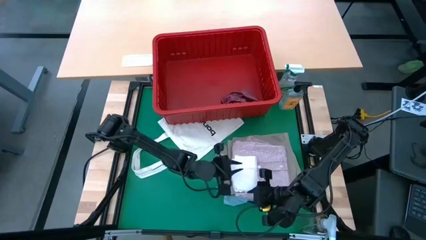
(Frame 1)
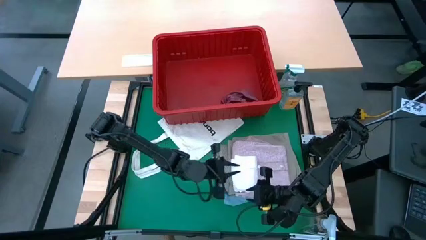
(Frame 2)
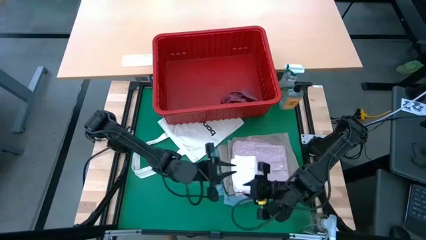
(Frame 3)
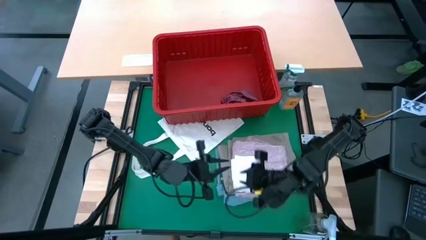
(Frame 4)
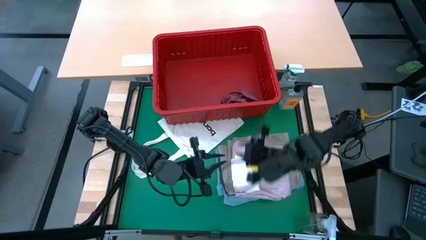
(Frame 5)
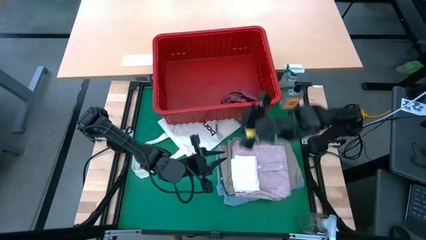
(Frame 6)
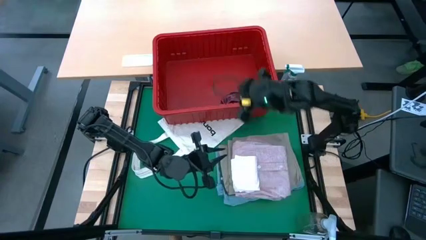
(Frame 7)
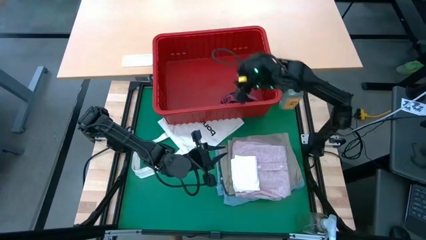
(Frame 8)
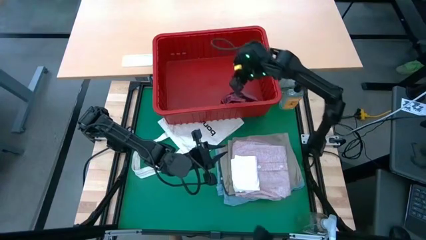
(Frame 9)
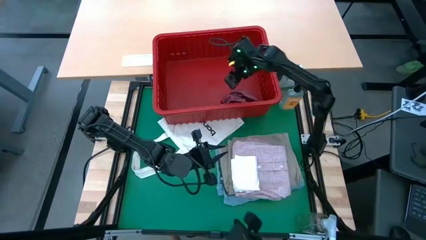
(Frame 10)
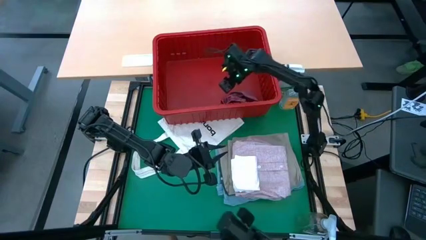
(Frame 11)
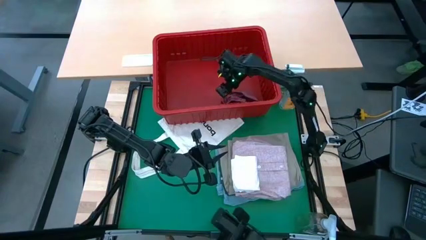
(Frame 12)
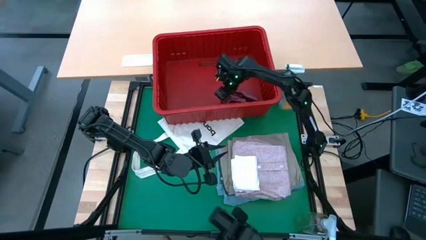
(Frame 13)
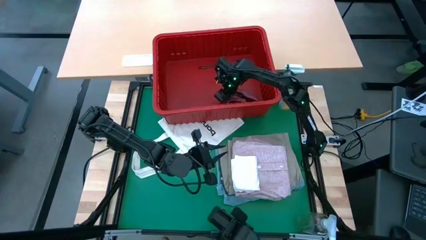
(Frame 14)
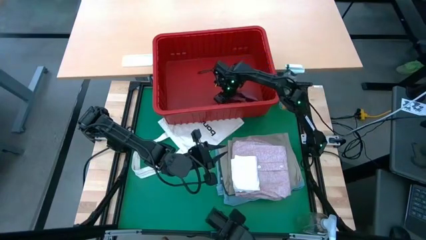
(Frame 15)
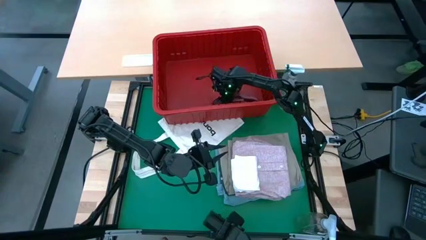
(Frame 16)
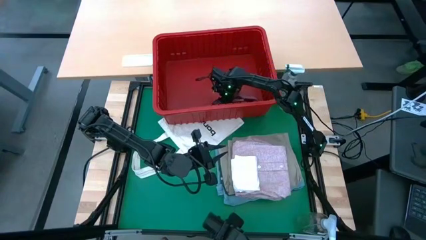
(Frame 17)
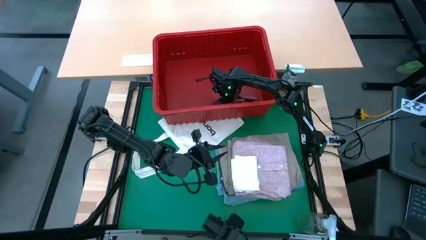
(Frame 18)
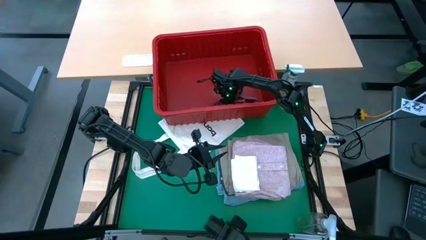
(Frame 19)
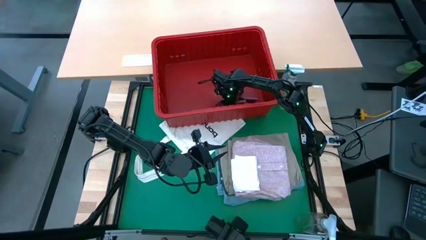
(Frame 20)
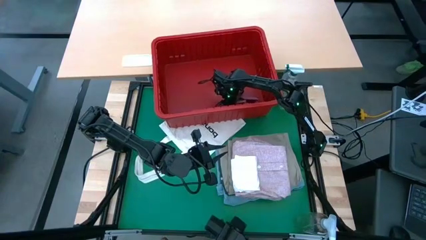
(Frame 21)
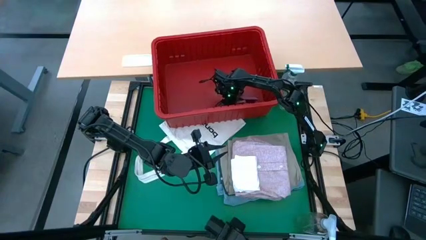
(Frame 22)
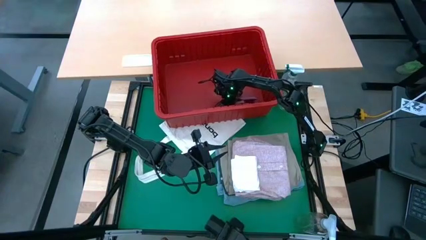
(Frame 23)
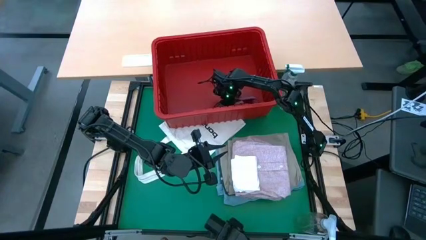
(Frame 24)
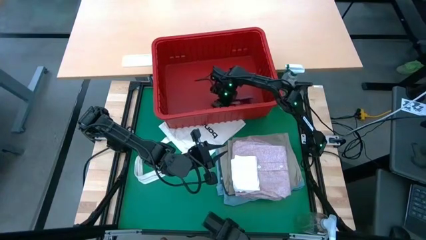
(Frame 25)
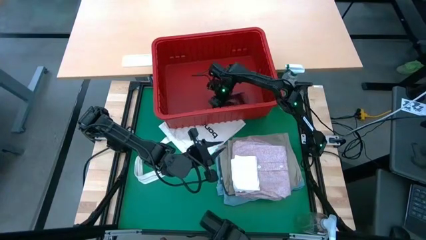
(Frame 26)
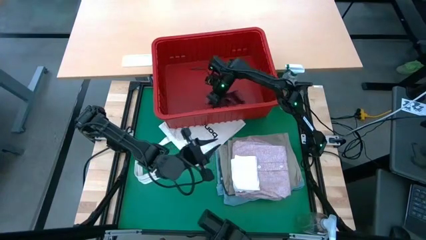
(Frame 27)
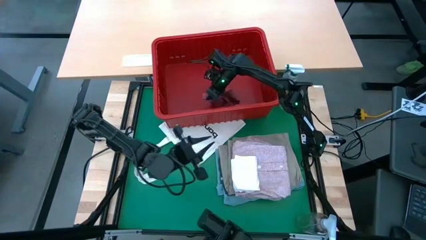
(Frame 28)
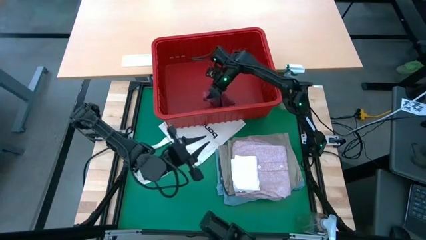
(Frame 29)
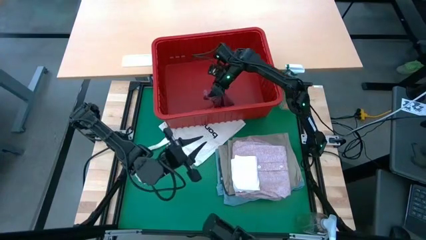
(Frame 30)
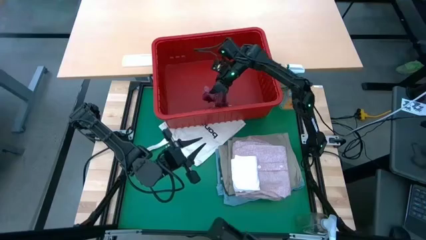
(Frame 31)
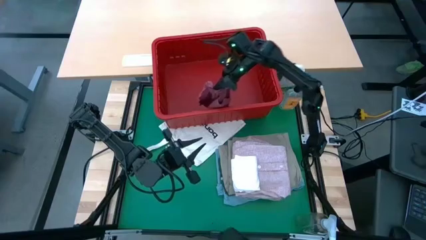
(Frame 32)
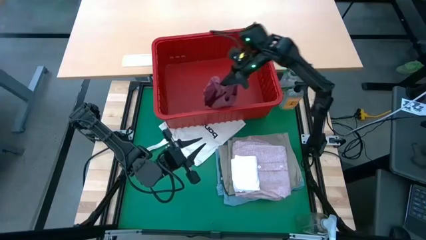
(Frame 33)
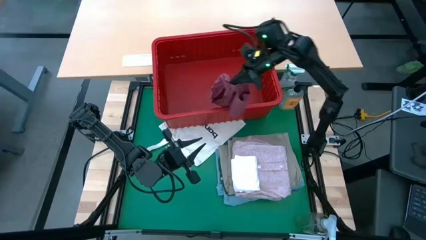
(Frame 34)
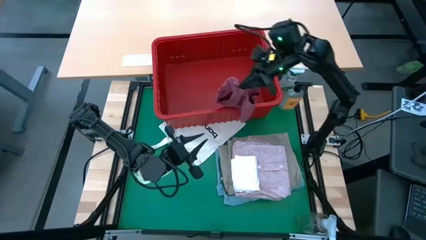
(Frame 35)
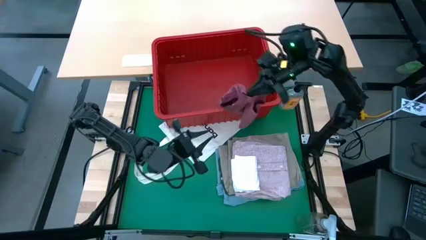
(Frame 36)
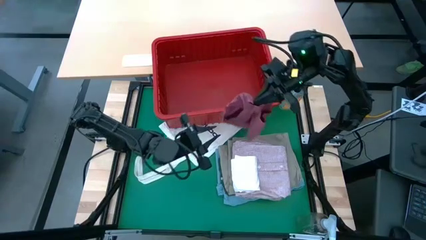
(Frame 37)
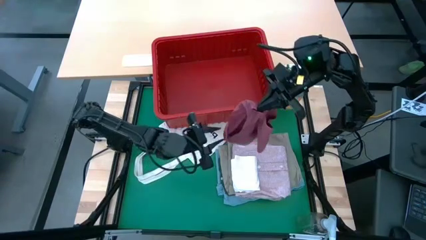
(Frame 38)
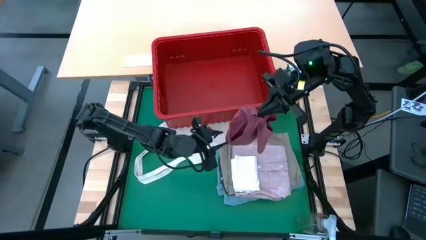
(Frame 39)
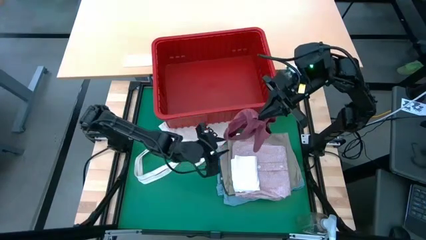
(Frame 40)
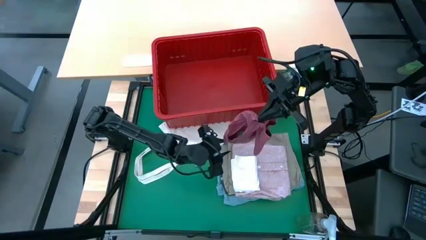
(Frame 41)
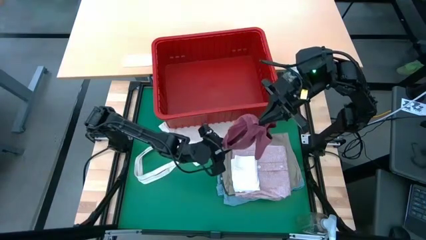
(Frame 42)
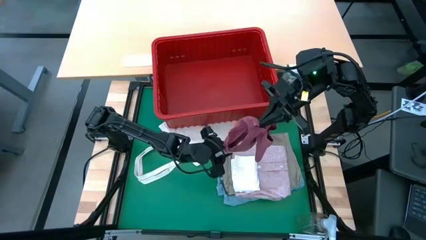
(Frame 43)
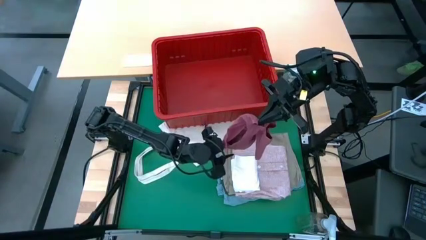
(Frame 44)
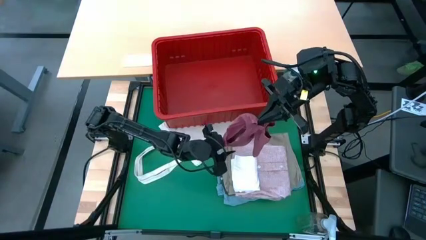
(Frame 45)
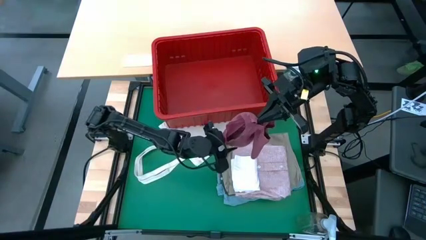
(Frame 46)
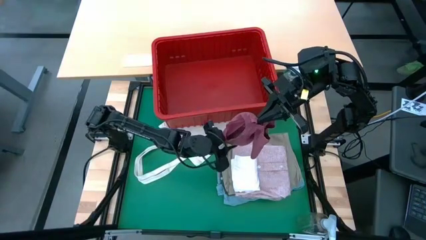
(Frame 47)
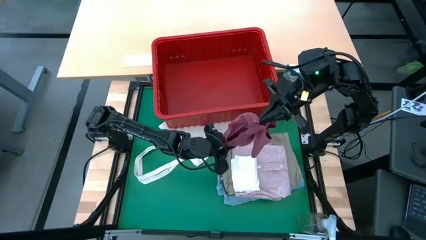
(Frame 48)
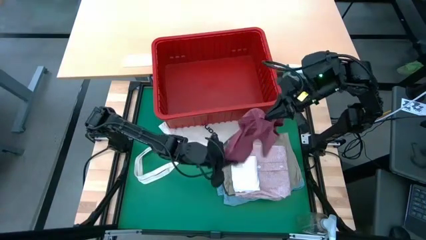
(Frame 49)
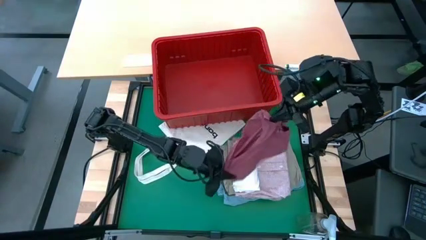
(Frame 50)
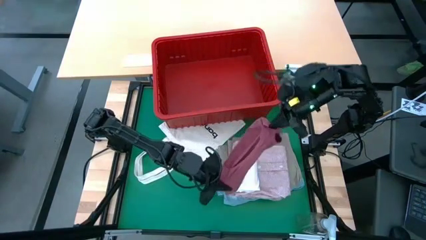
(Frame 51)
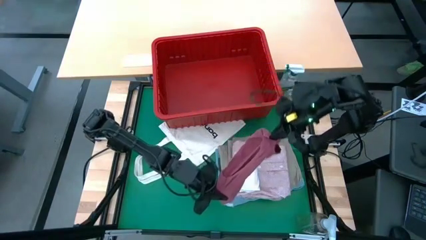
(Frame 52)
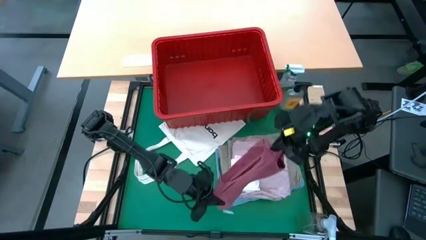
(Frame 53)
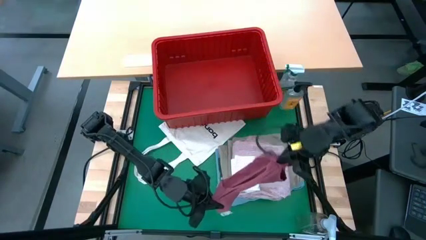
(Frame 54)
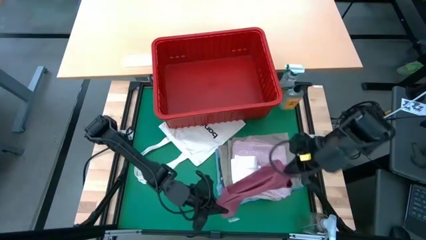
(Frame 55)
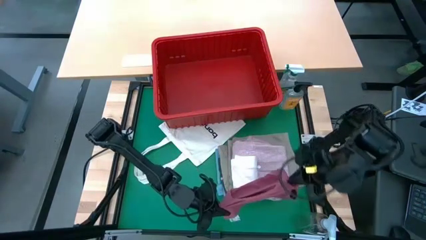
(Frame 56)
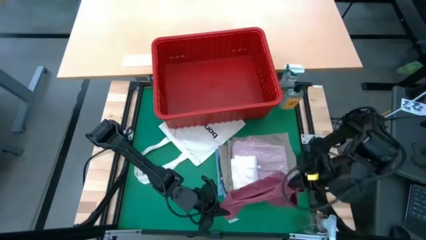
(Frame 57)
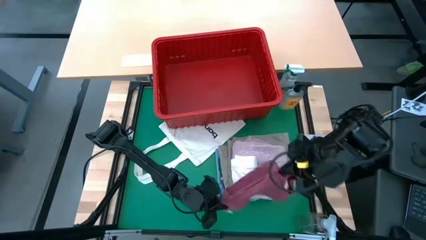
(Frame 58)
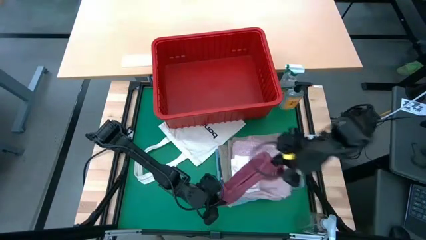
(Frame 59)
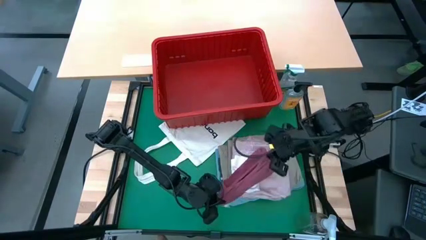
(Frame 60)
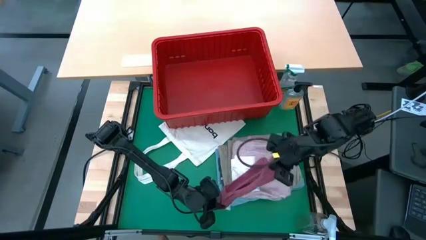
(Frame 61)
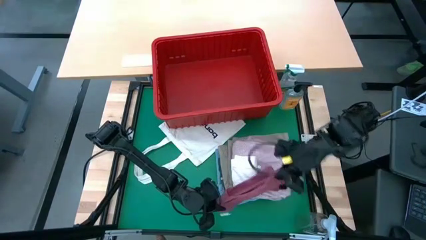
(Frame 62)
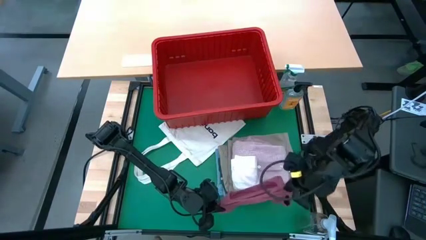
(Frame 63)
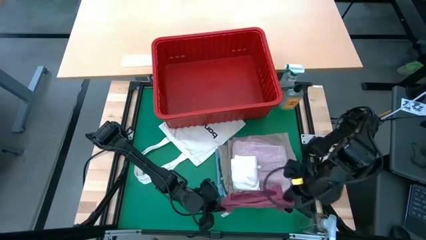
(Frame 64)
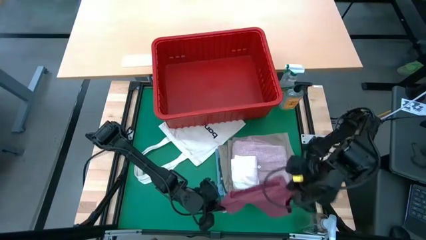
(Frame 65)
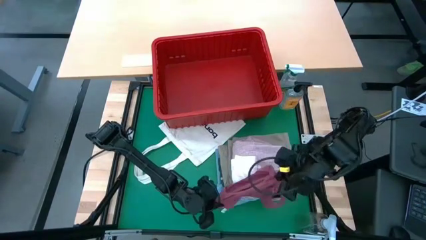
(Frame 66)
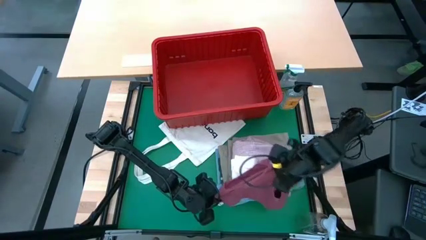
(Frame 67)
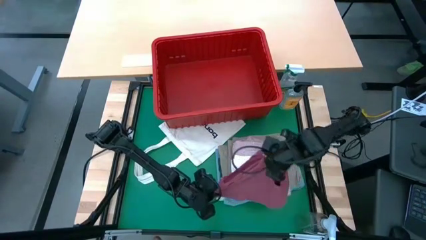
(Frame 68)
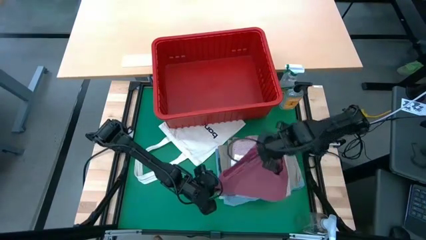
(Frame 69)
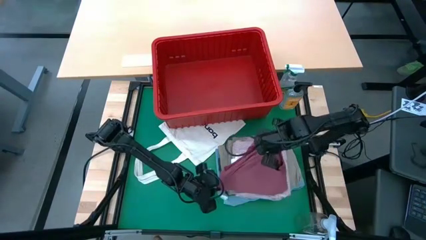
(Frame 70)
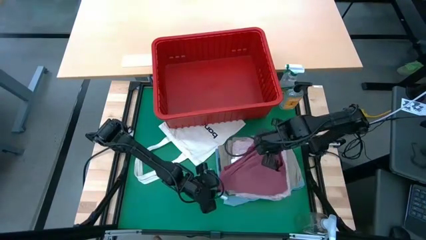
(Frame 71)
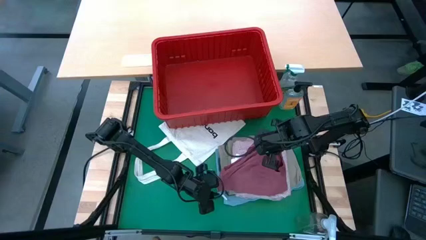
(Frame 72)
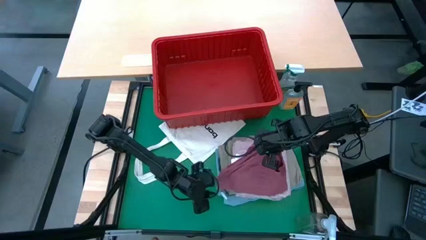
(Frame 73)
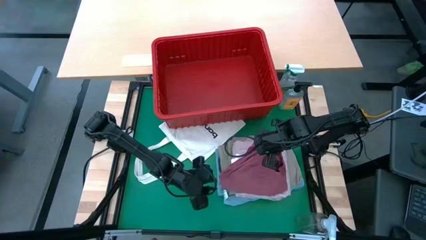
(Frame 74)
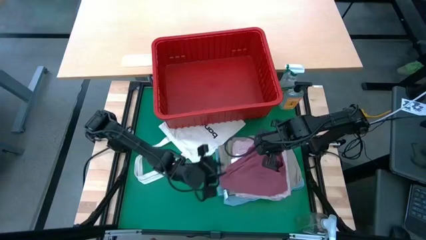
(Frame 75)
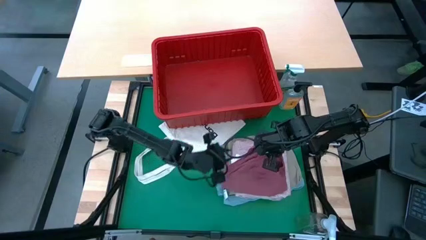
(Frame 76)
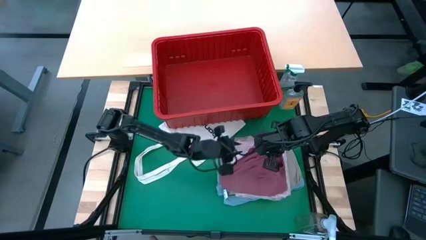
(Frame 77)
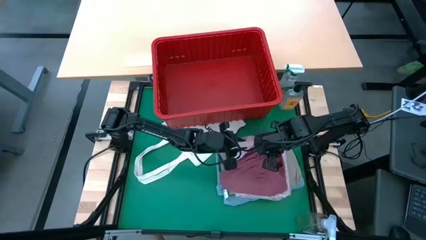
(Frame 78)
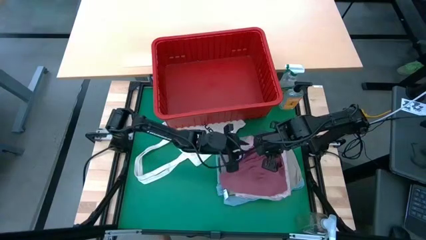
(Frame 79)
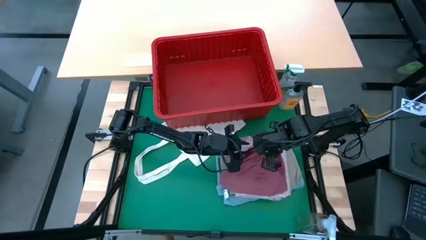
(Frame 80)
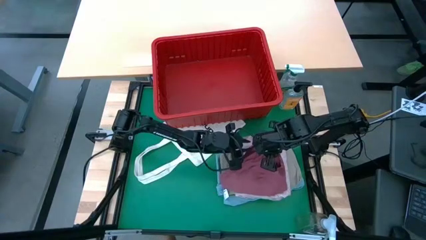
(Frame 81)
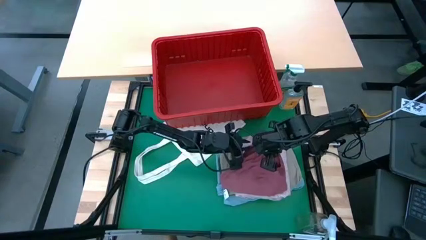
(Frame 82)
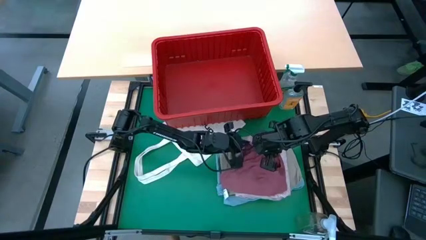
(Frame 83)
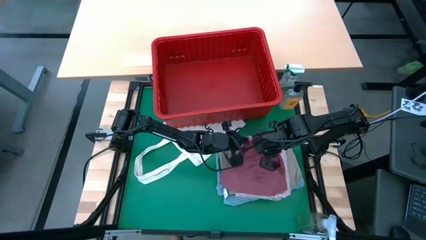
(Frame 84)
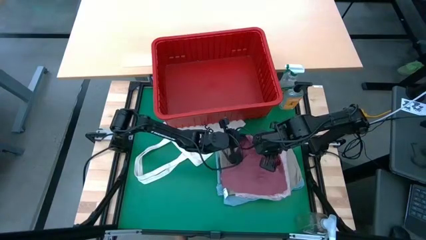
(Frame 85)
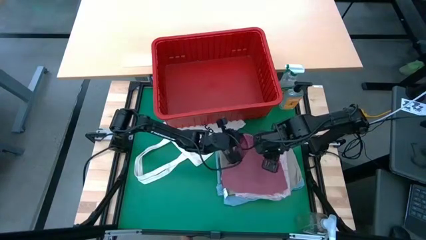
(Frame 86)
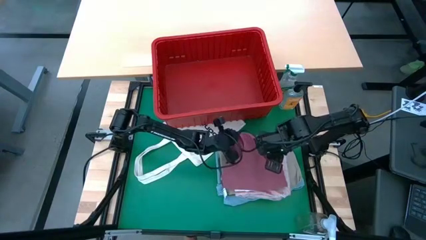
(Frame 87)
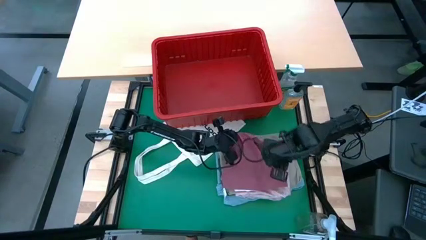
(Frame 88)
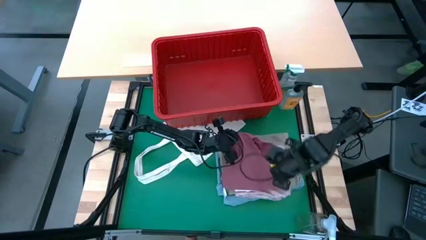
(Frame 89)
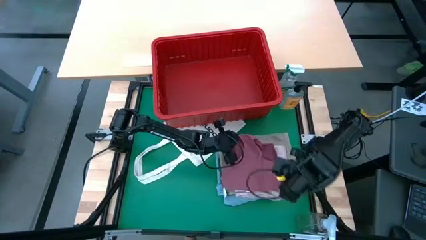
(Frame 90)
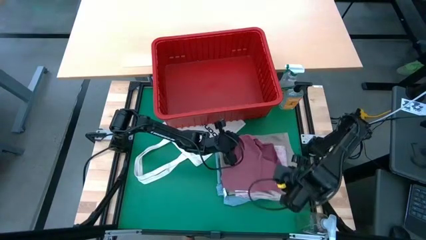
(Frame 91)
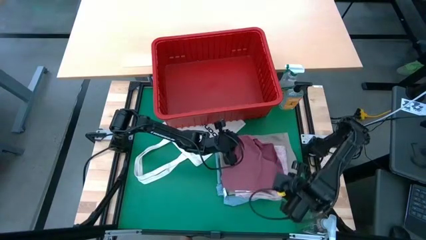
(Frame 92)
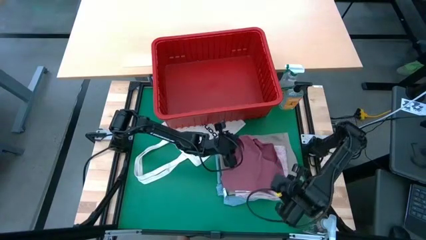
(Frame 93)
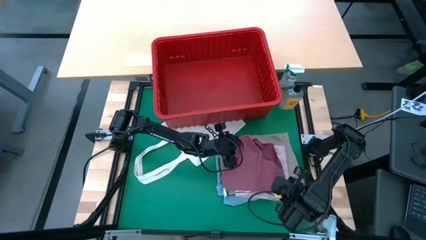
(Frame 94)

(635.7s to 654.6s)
Task: Fold laundry
Fold the red underwear
